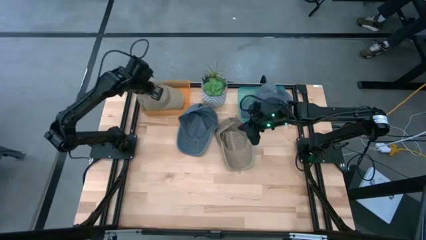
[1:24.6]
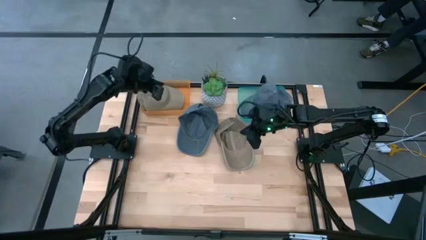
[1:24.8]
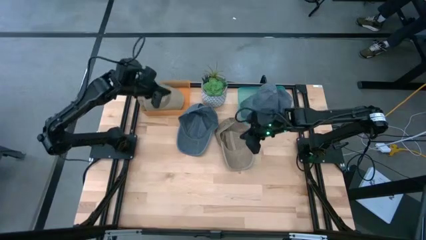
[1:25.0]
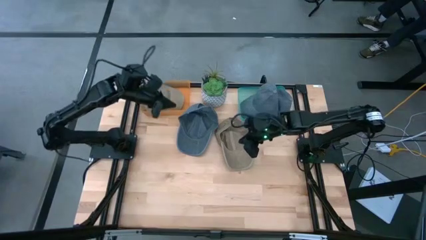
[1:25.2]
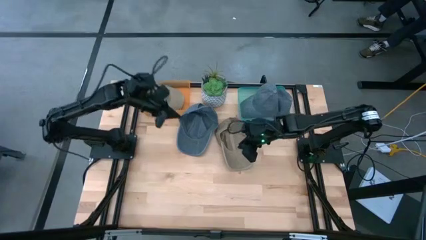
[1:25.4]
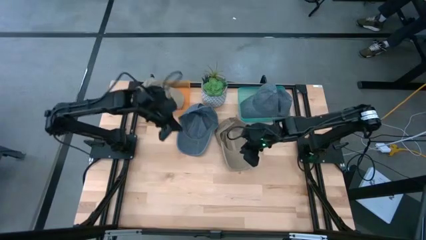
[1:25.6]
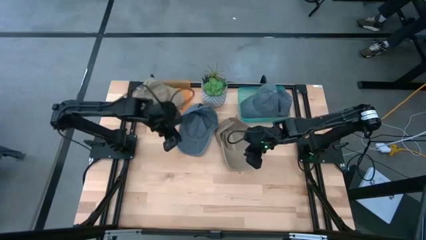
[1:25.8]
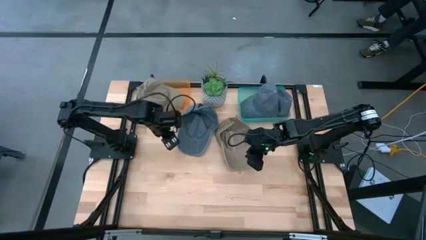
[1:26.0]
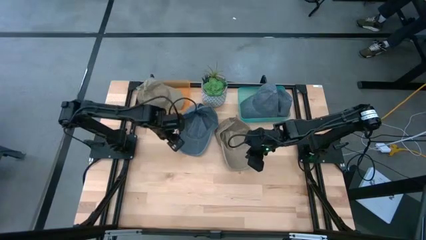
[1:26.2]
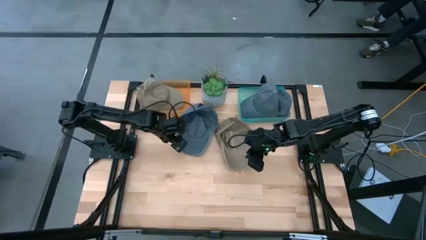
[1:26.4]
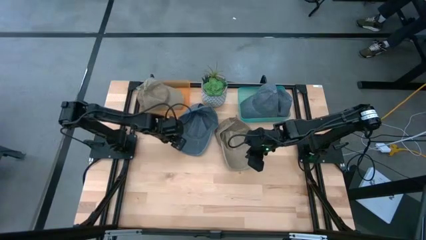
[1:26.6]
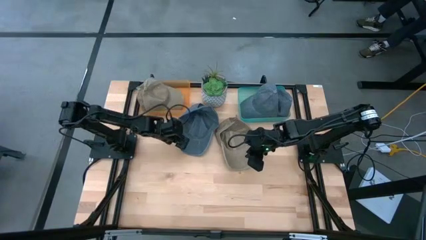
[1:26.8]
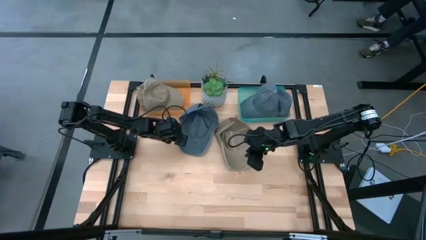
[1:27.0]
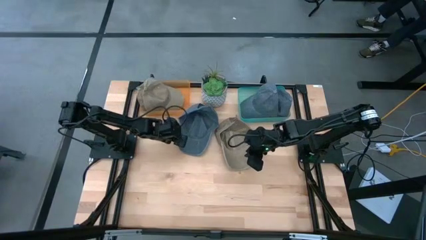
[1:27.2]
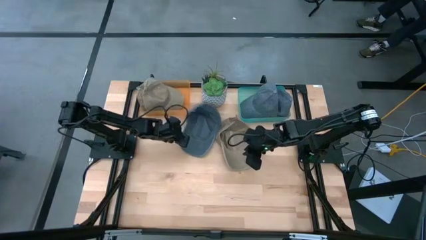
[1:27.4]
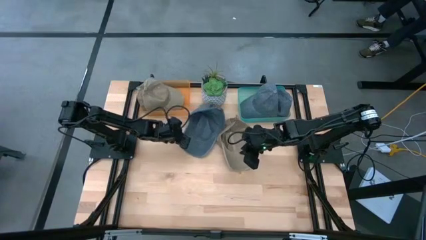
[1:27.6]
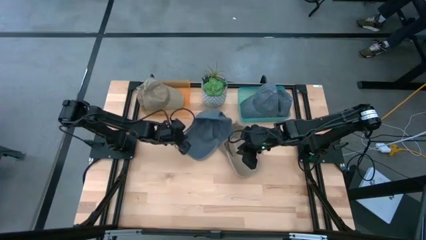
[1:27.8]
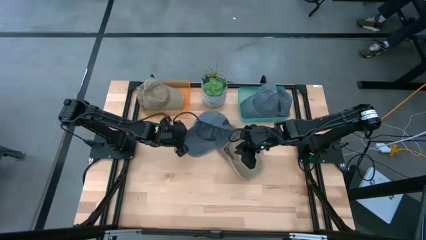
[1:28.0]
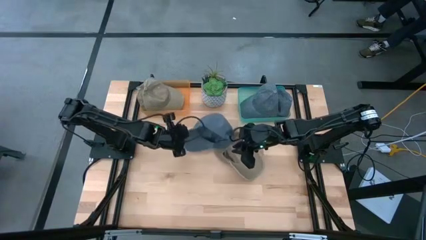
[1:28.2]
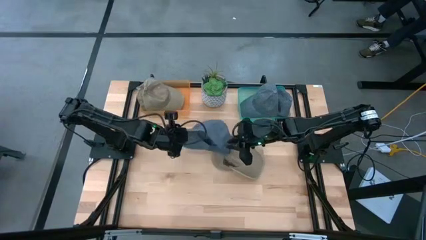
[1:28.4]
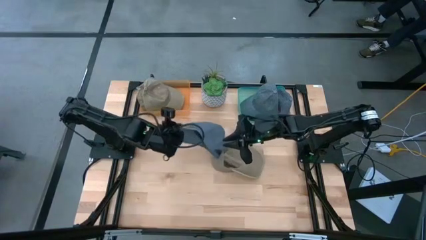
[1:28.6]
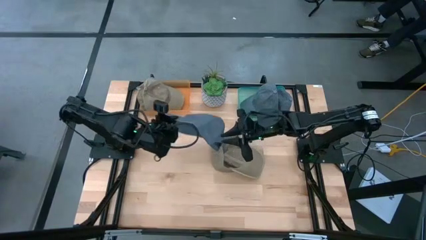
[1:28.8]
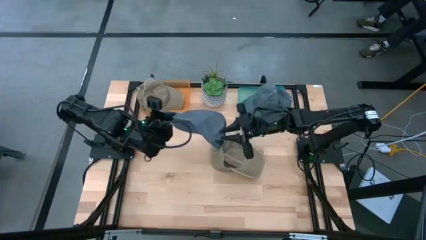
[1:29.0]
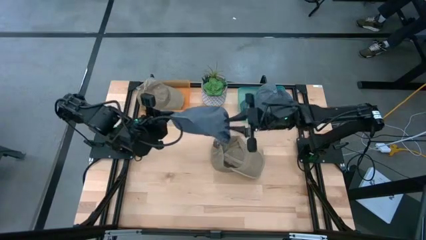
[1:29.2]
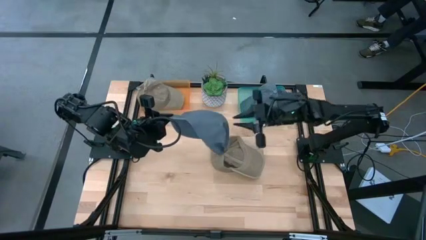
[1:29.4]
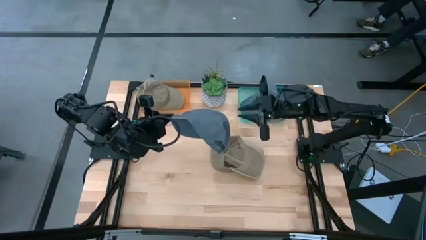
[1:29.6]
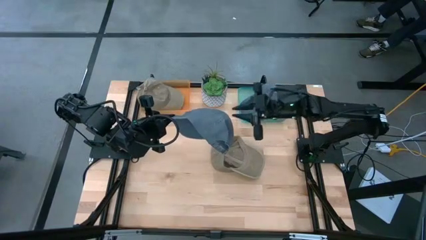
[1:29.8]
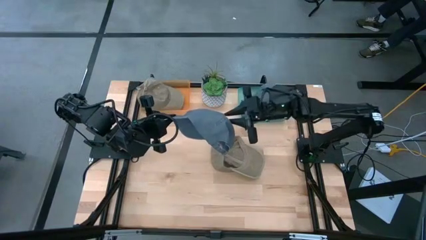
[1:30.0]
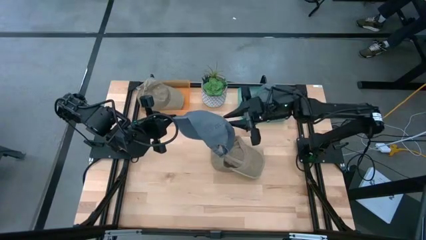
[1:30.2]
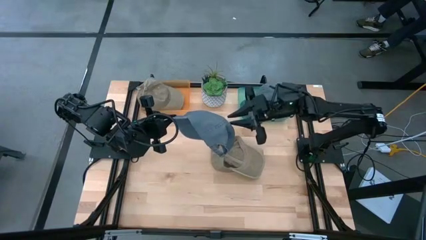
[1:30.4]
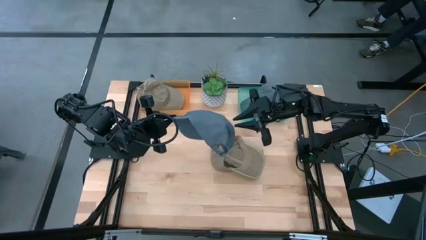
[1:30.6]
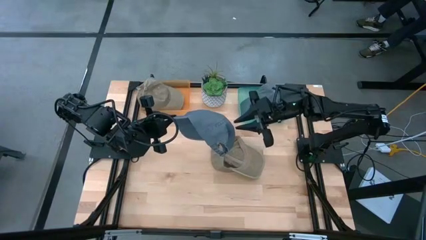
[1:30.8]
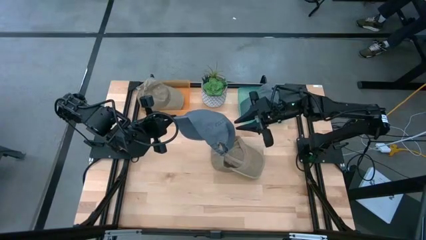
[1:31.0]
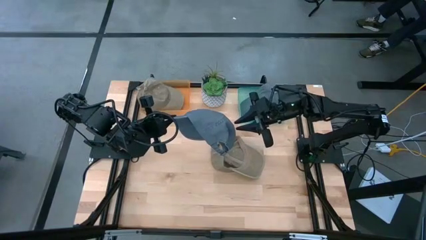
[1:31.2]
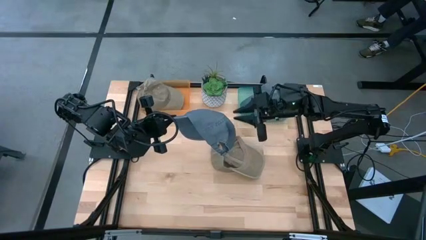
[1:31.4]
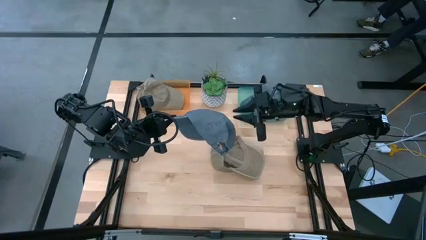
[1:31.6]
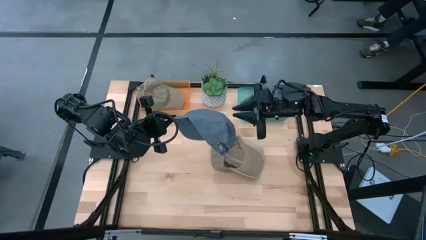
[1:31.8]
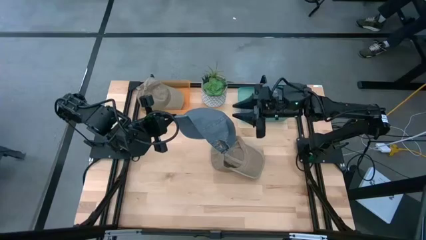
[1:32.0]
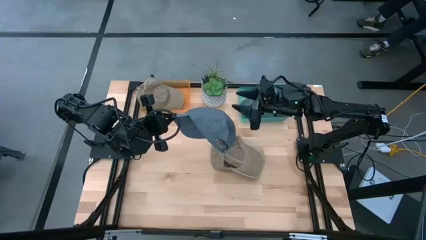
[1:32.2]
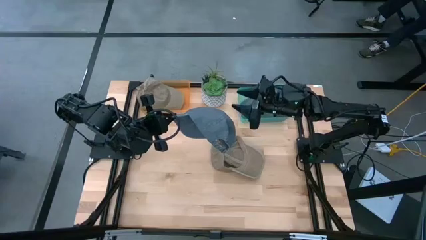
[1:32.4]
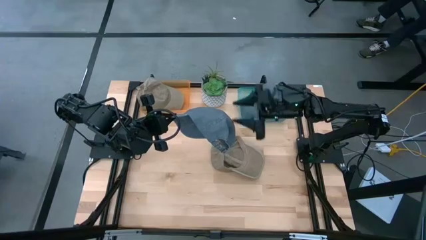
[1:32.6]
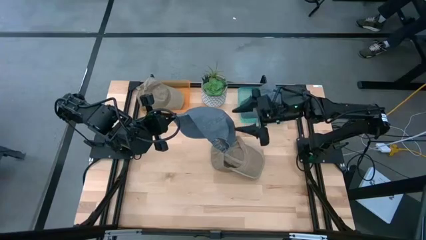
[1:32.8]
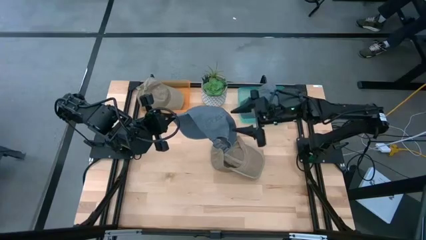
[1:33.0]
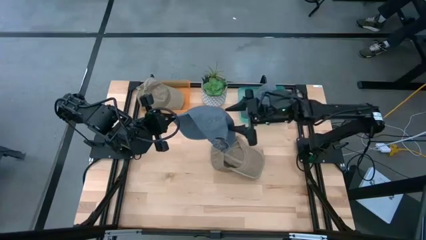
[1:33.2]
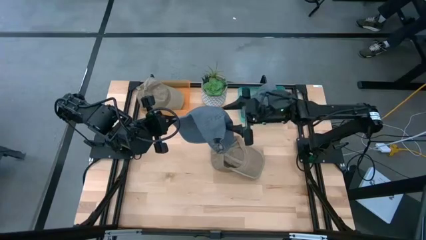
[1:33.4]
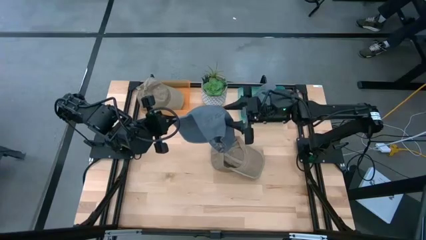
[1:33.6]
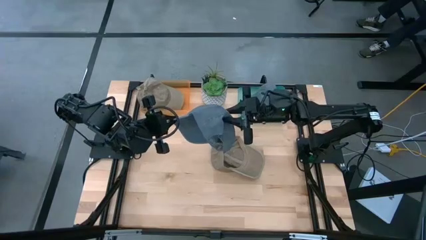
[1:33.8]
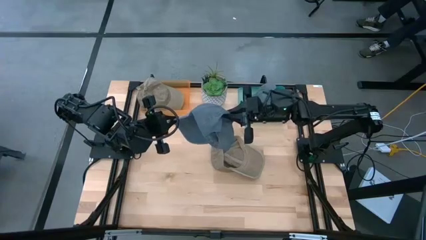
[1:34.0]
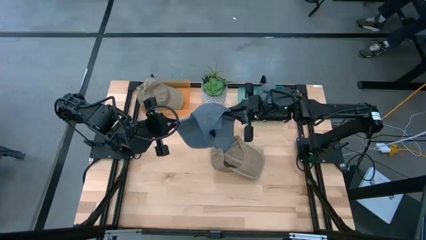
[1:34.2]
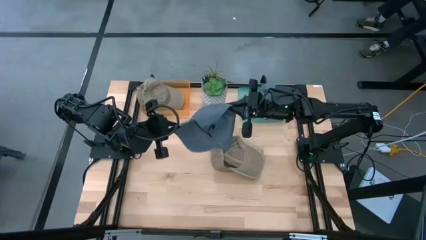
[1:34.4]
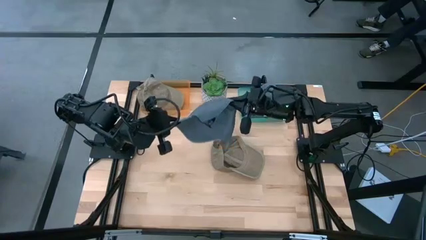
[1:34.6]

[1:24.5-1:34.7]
Task: Pick & Place hat
Put the gray cap into the green bin

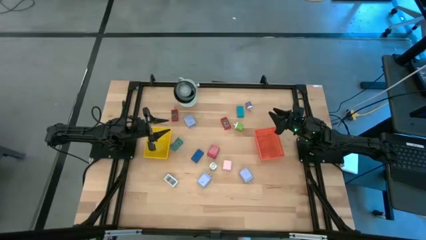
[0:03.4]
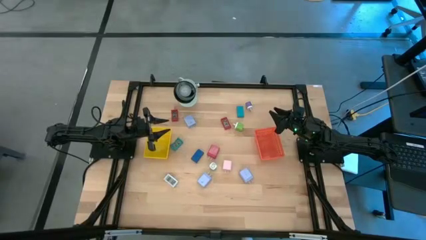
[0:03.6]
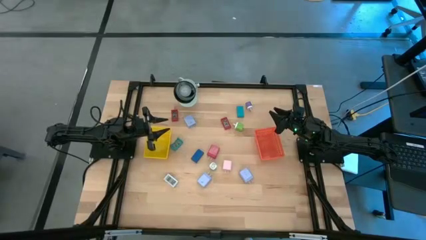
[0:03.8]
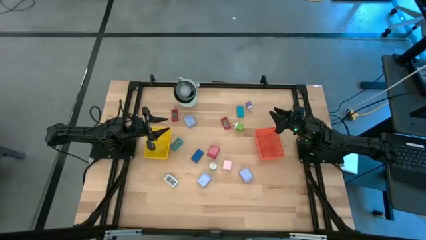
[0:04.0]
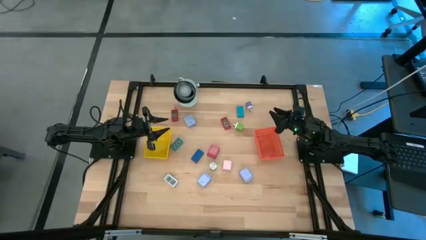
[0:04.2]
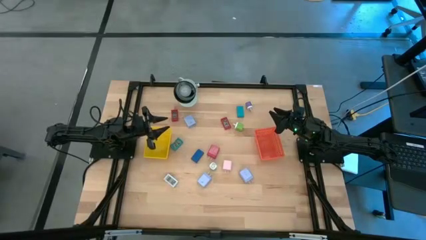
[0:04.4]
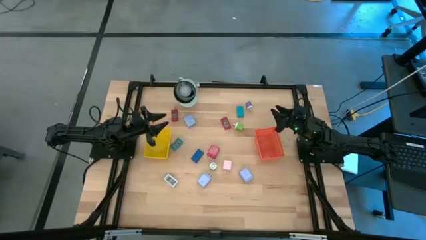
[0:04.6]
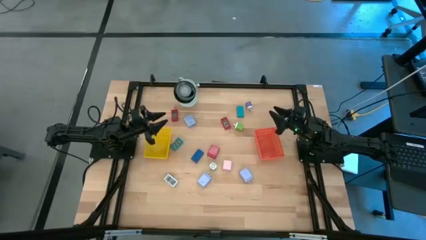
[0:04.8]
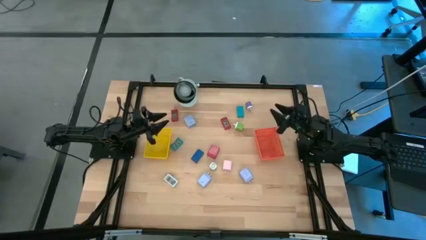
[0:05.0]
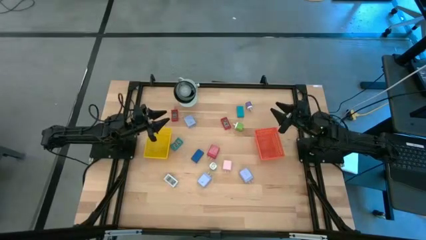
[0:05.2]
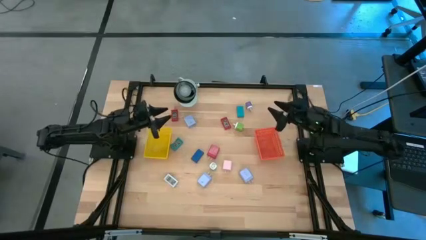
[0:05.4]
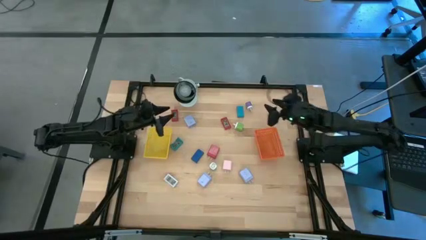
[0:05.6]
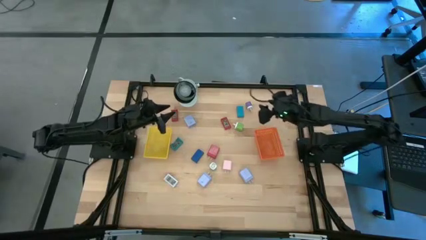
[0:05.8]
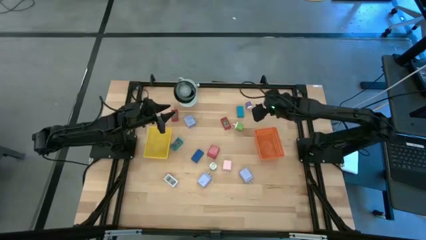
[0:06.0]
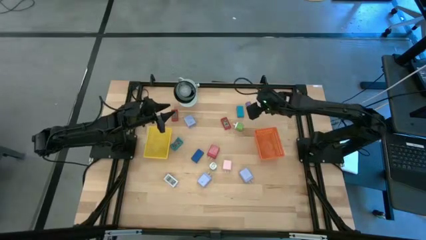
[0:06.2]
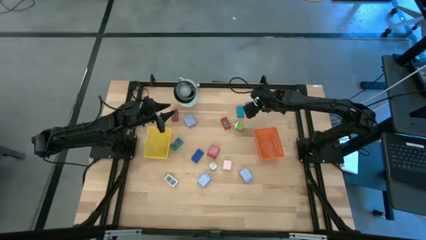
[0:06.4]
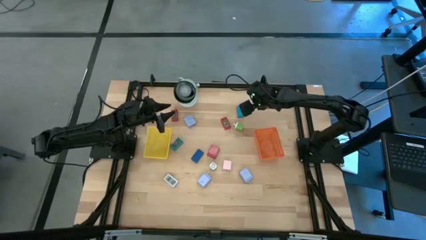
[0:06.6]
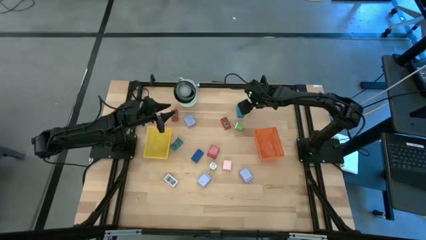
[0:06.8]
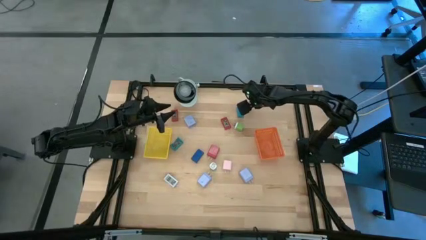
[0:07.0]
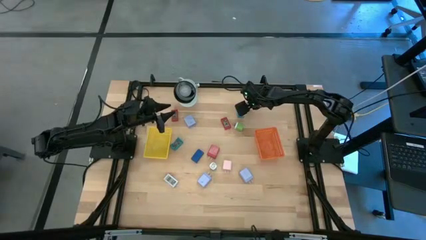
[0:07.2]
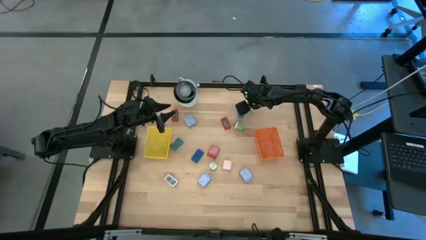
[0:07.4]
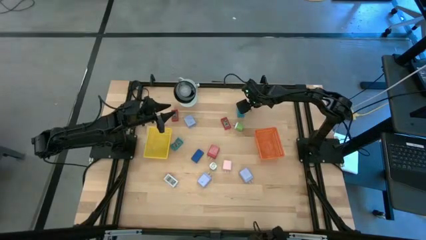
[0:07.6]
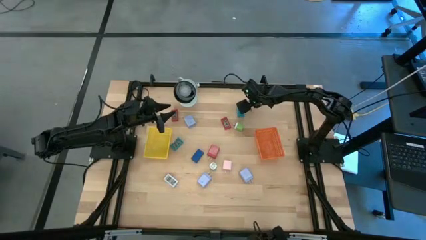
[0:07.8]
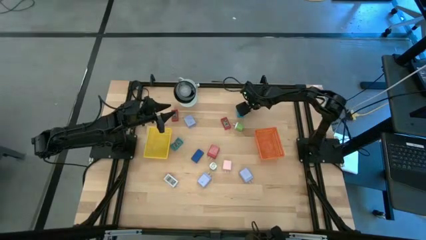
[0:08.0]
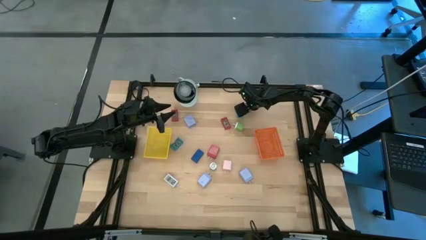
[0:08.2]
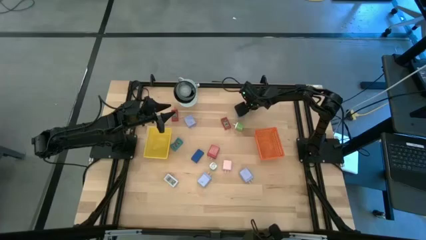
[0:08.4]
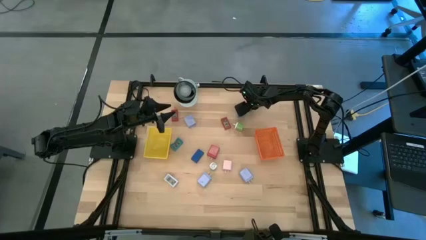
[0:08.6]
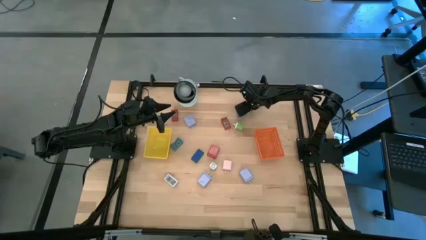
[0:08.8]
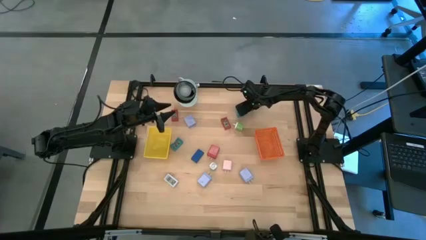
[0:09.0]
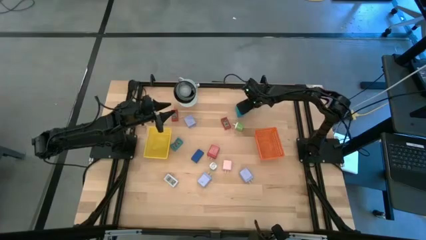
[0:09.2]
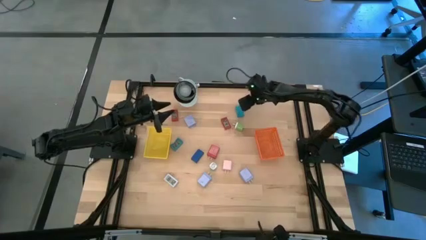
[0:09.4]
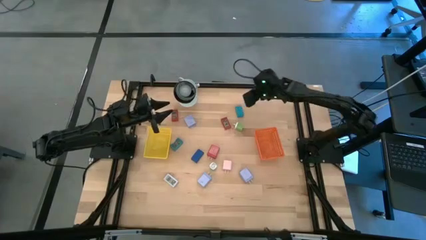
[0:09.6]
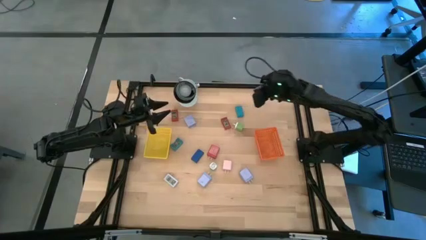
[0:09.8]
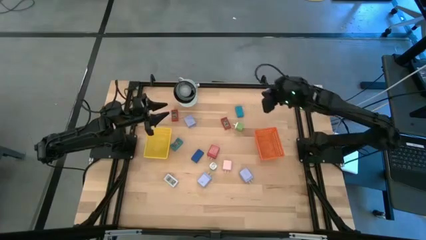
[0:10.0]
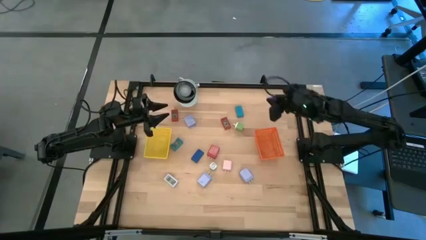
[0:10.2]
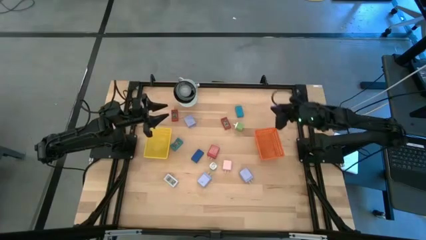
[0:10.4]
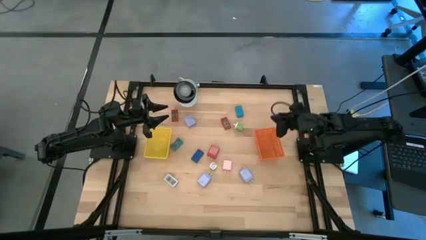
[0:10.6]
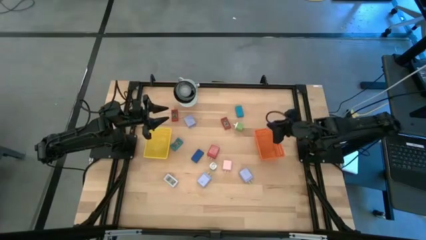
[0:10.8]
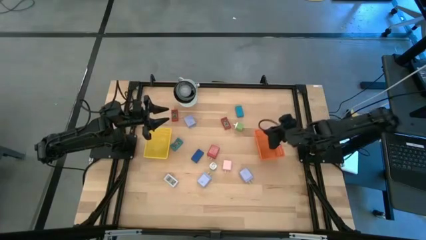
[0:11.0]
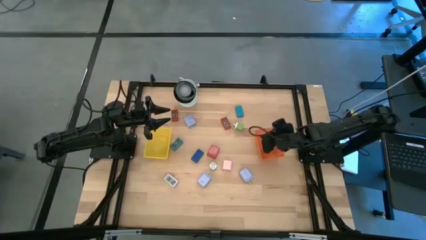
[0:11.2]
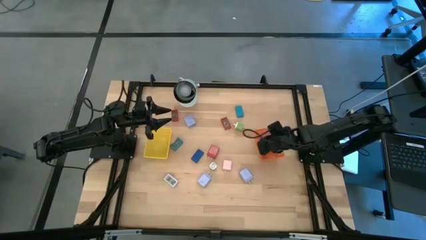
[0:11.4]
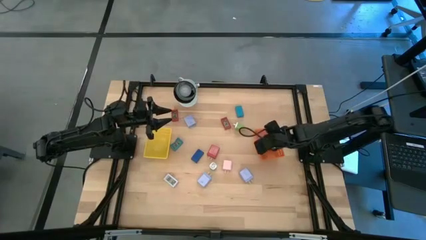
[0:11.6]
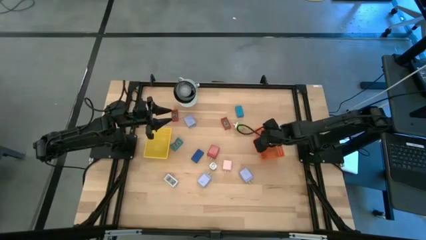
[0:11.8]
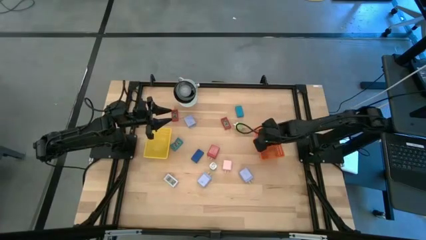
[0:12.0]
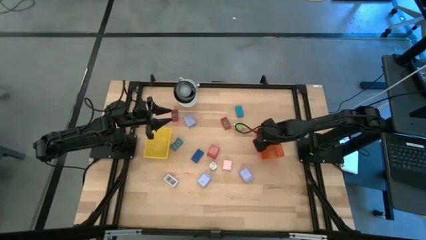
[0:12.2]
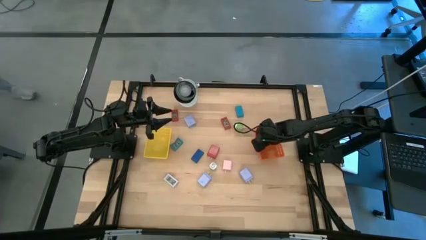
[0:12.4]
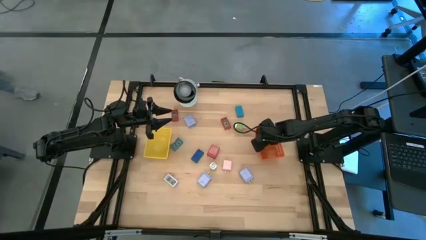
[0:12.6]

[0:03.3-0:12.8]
Task: Pick & Place Office items
Put the purple charger adapter into the orange basket
